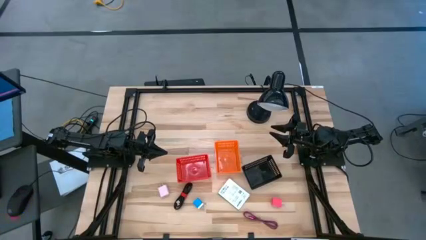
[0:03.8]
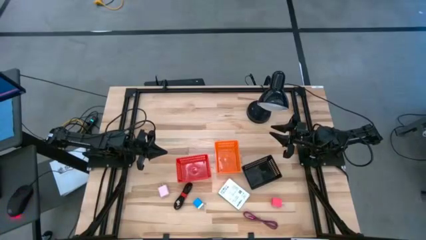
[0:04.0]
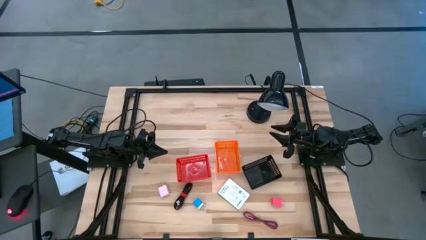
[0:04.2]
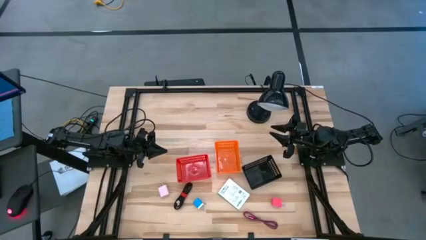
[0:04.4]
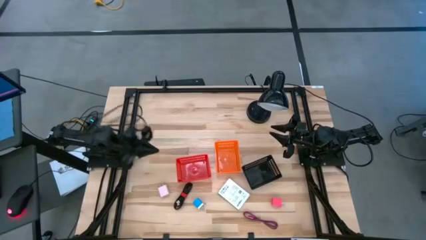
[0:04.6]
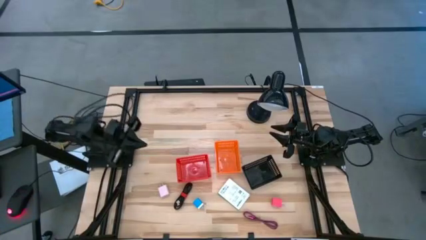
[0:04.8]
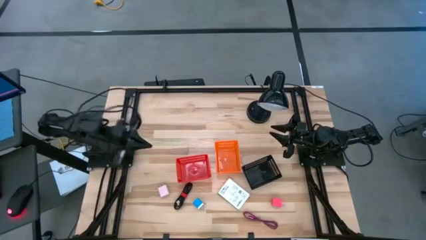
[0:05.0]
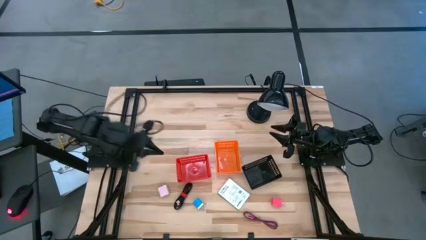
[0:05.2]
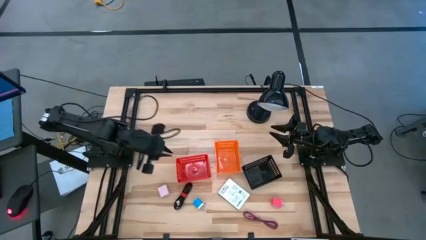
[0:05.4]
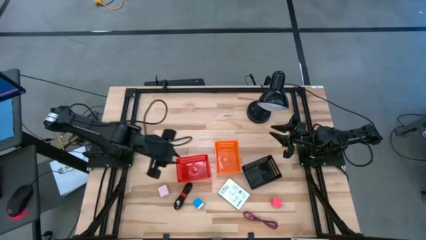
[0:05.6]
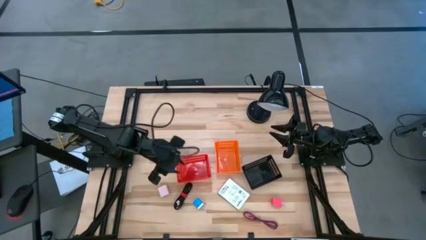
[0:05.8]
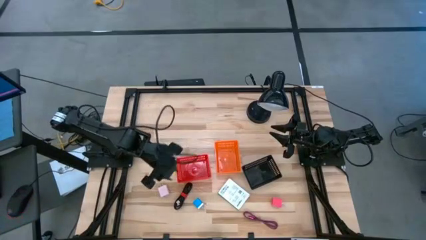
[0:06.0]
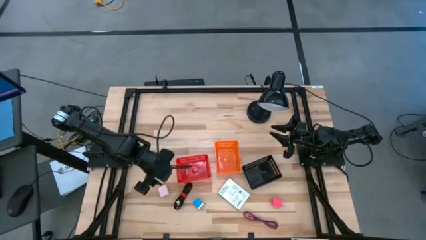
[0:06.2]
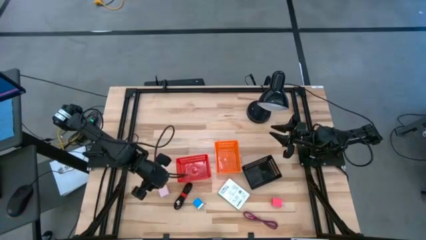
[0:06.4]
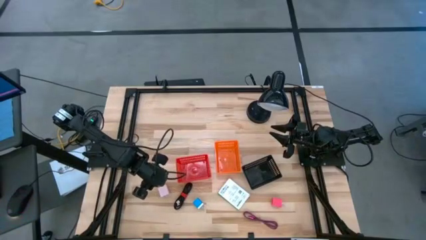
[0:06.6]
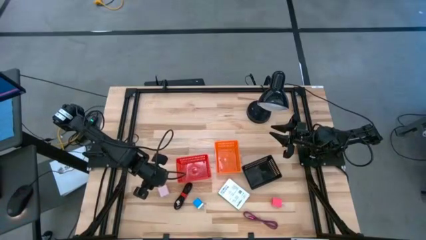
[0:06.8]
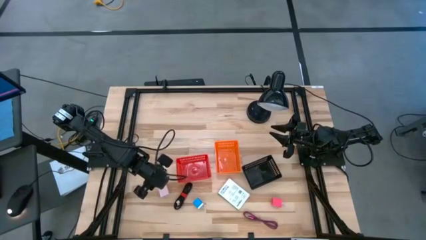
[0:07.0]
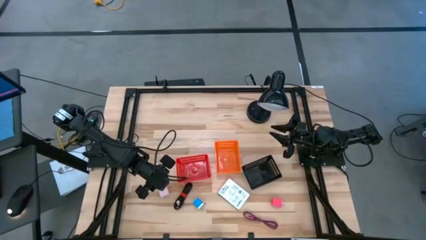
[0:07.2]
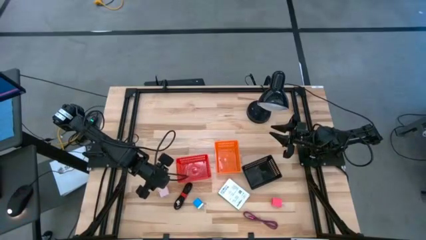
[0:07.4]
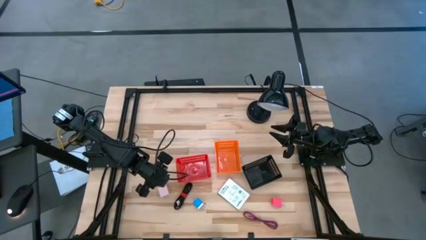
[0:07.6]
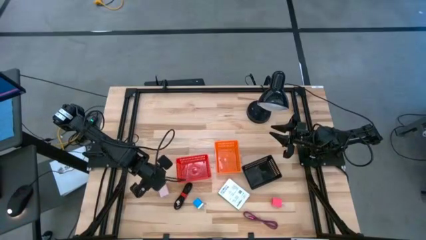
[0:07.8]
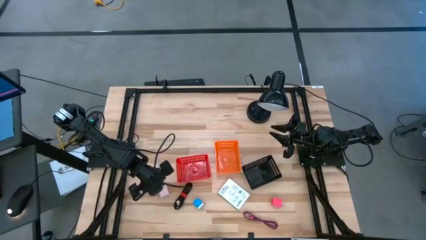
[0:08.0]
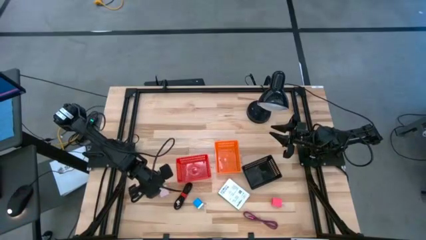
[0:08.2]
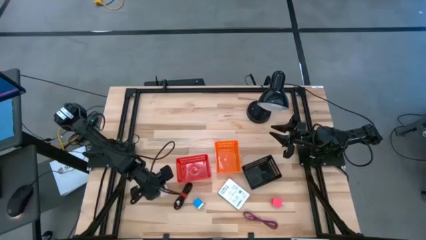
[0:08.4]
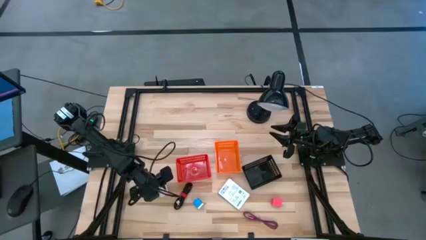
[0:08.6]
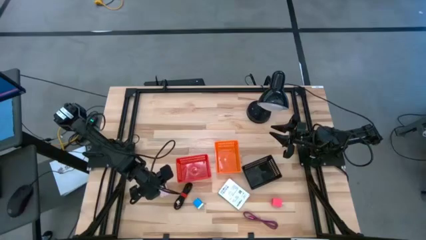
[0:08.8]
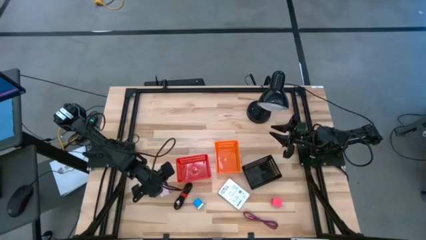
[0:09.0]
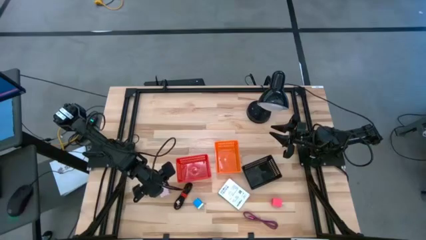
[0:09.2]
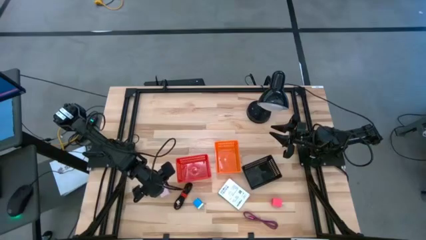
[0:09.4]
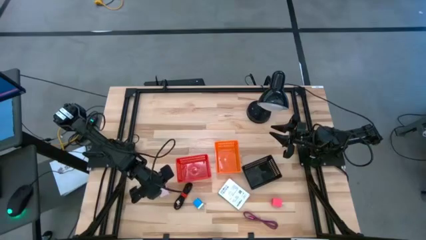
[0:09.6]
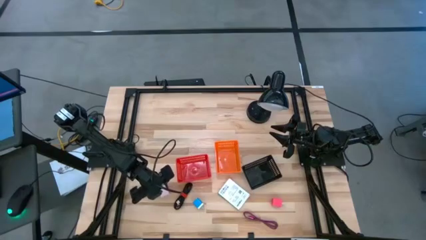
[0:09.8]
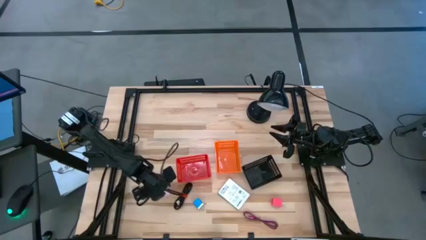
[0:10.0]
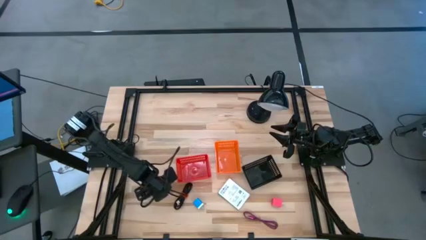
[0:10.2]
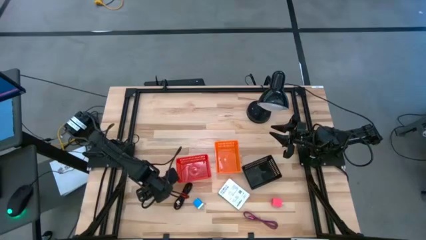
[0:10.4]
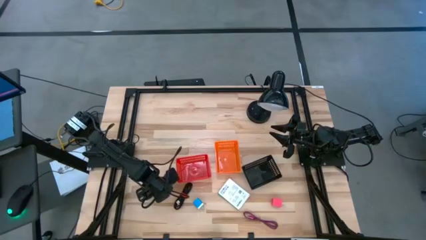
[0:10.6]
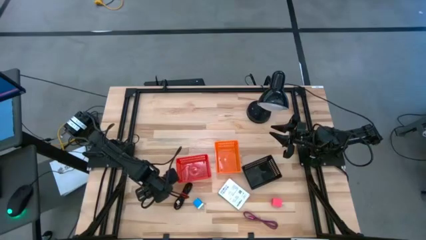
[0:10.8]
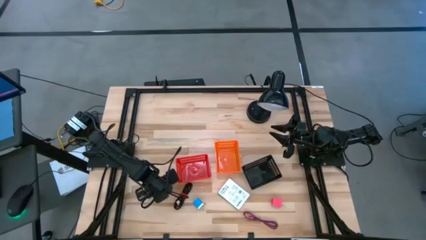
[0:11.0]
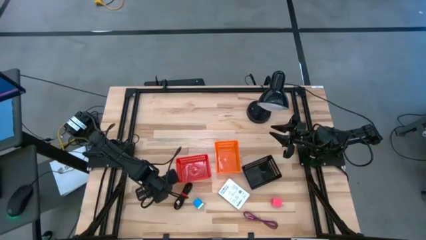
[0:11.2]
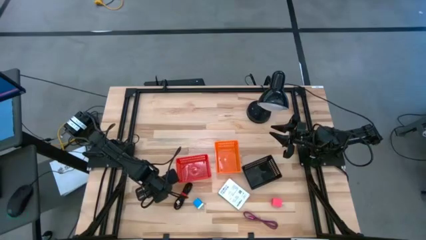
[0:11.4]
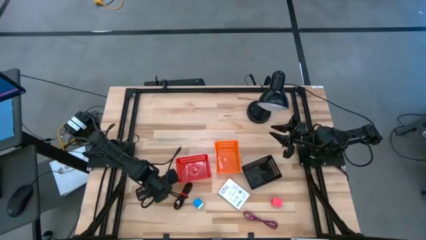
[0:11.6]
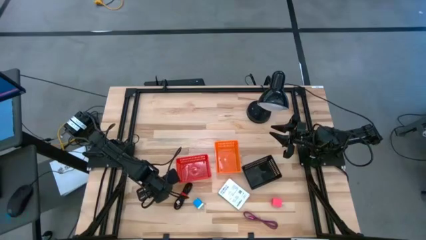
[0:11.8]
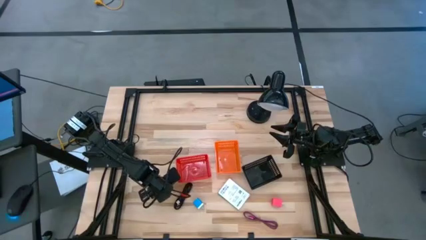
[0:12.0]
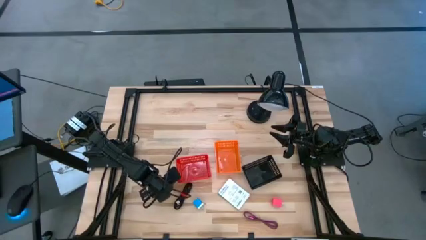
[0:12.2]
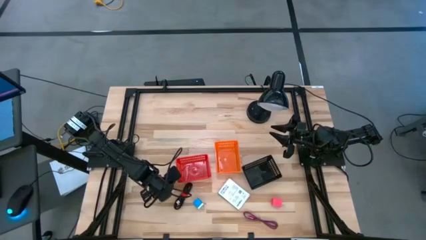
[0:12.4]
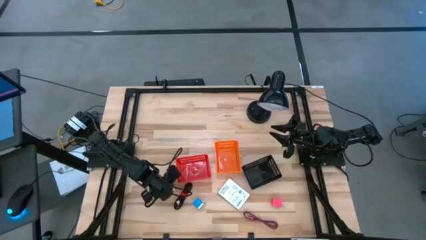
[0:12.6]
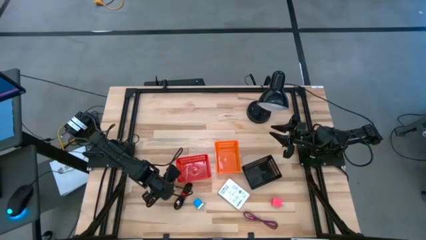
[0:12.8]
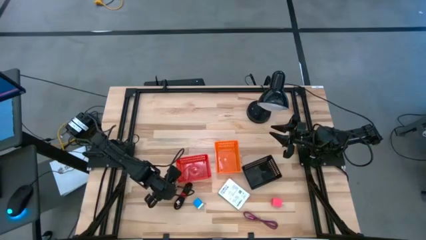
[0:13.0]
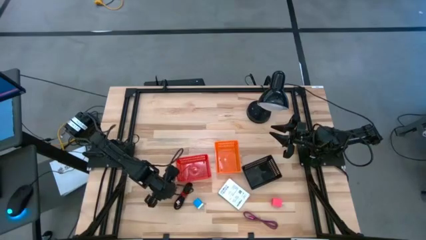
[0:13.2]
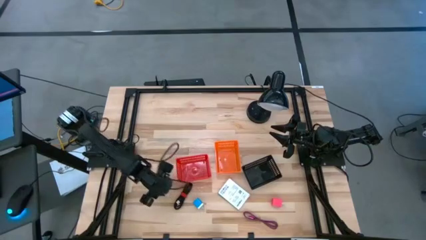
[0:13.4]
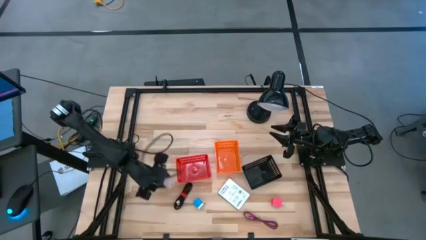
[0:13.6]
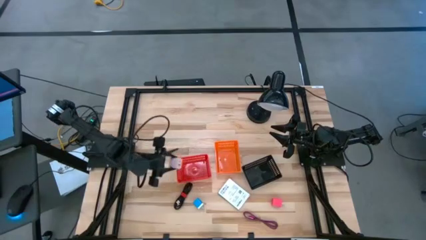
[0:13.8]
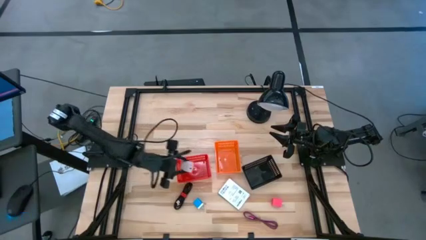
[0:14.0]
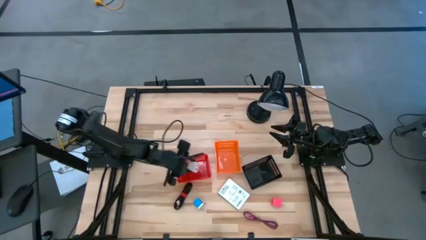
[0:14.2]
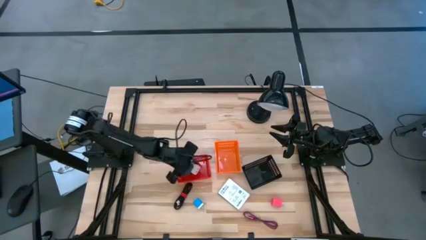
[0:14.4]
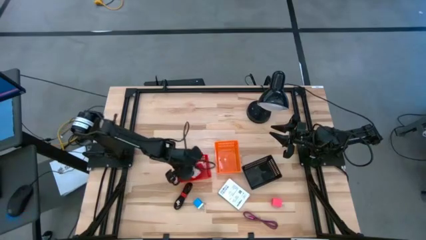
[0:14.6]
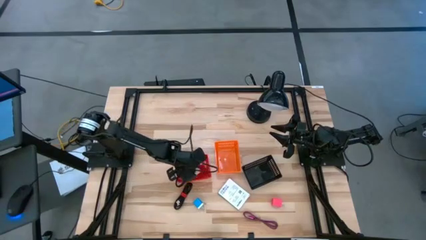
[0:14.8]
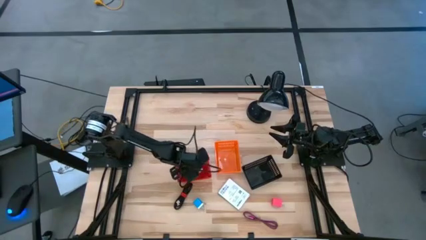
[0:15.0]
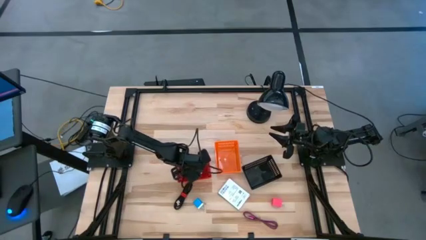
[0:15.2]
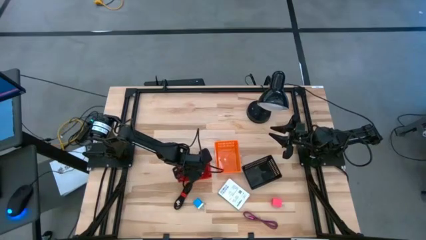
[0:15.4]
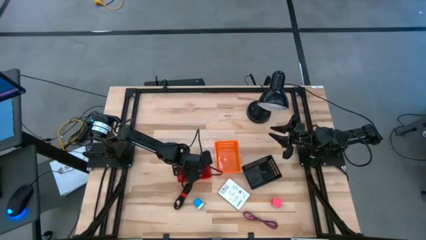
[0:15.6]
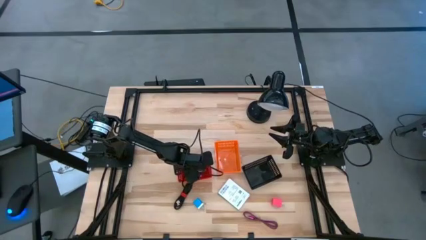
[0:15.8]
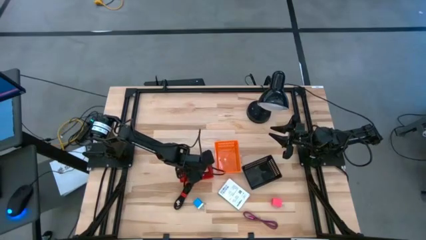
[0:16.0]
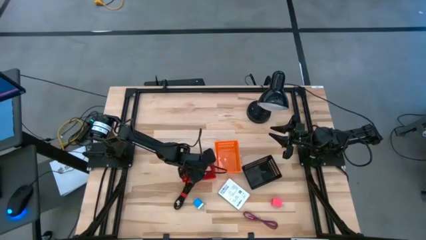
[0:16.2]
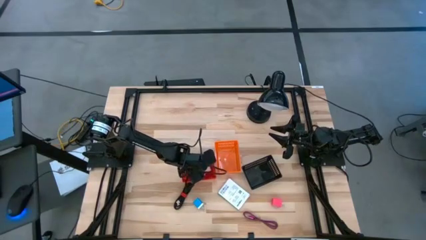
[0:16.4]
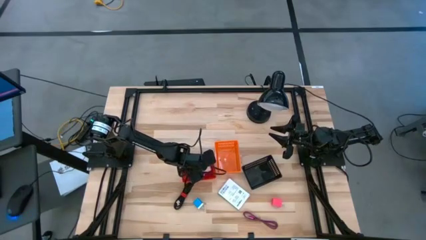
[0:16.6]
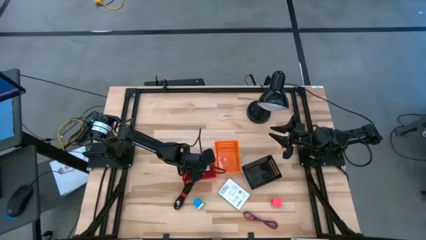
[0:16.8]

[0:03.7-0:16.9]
Task: Pick and place items into bin
Put the white charger adapter into the red bin
